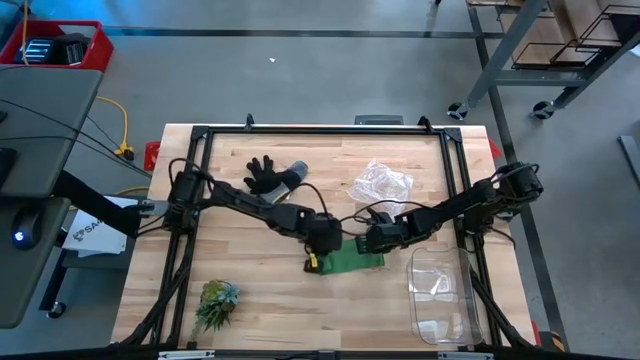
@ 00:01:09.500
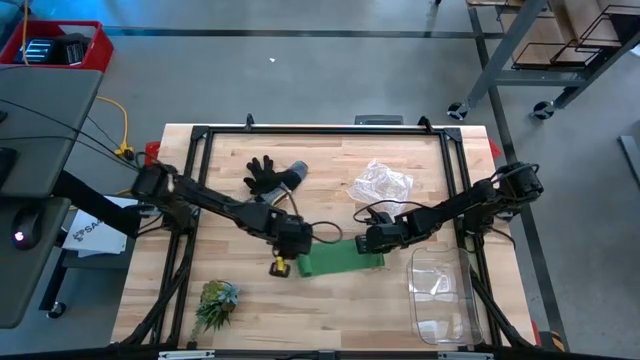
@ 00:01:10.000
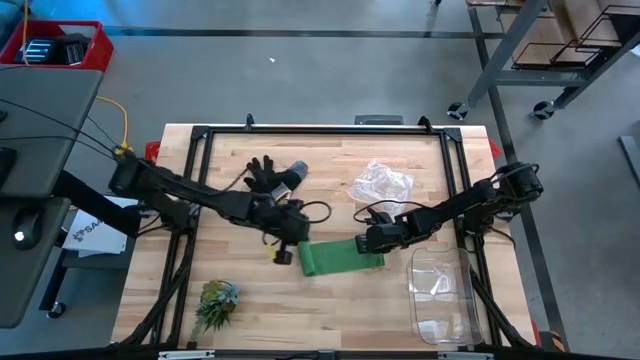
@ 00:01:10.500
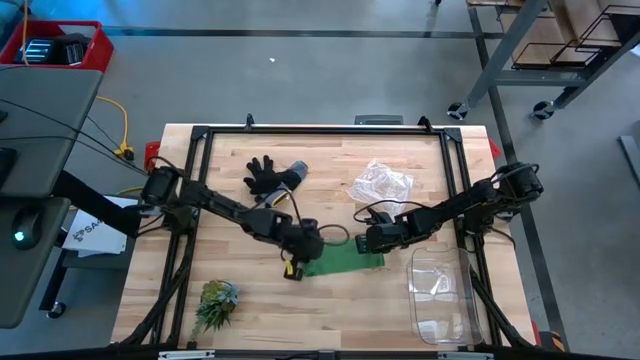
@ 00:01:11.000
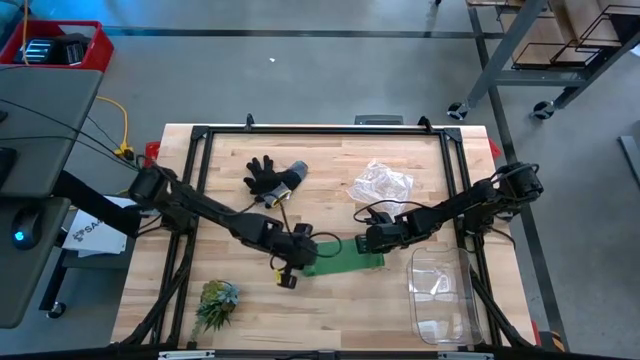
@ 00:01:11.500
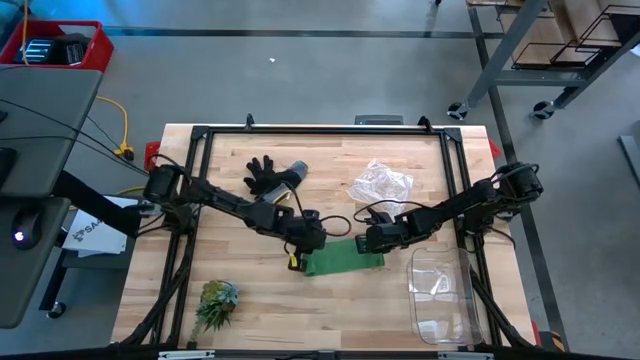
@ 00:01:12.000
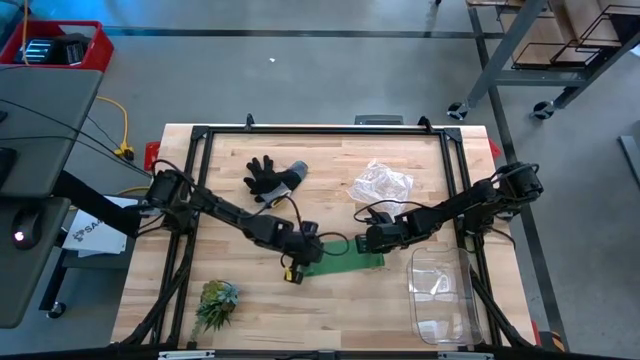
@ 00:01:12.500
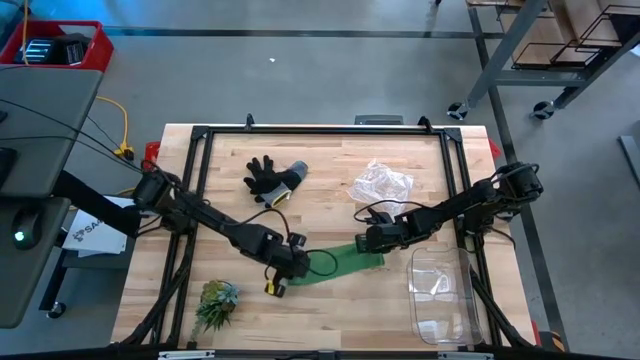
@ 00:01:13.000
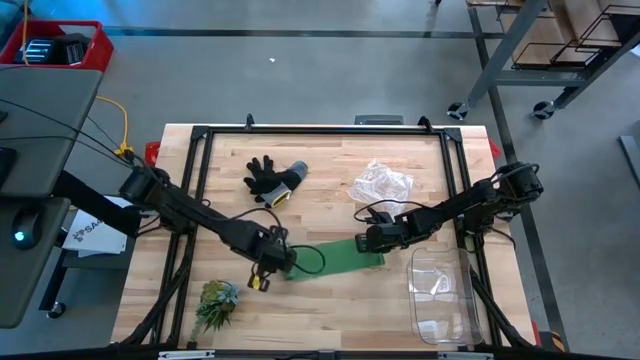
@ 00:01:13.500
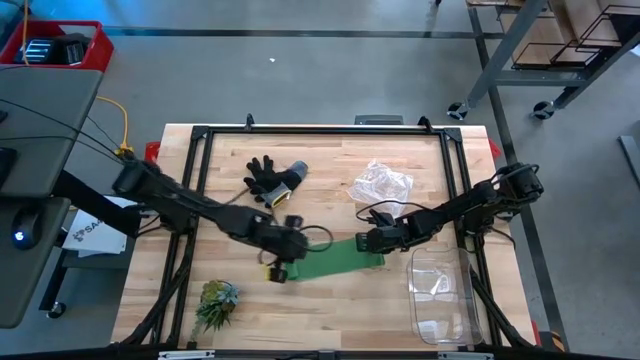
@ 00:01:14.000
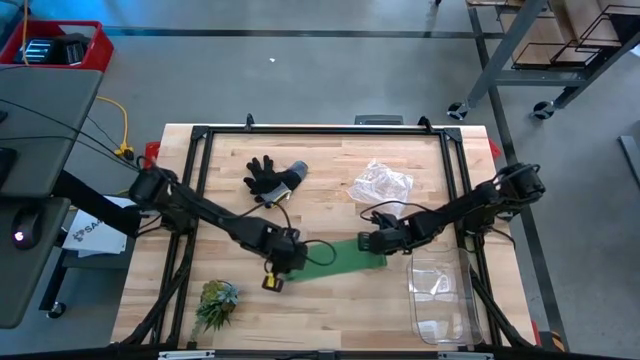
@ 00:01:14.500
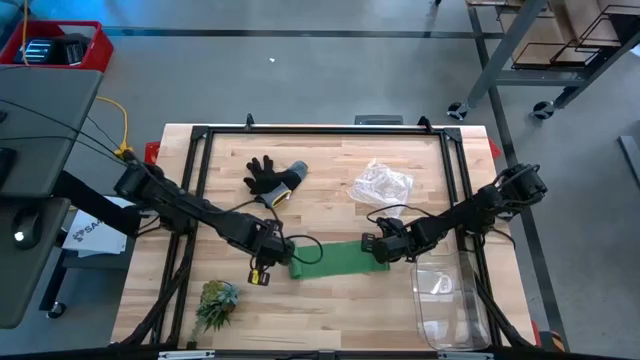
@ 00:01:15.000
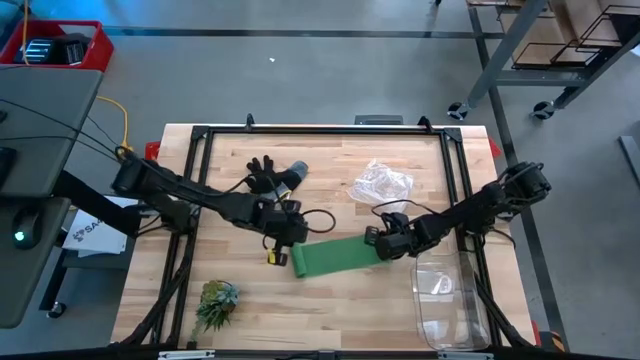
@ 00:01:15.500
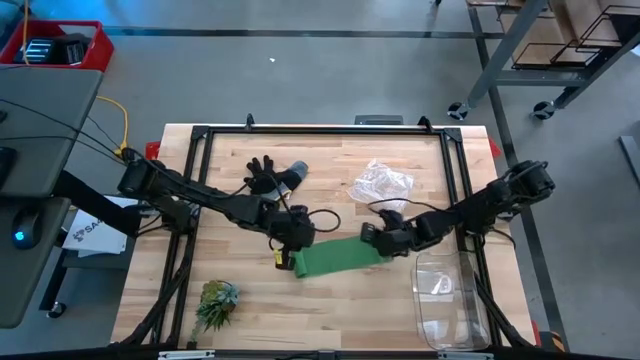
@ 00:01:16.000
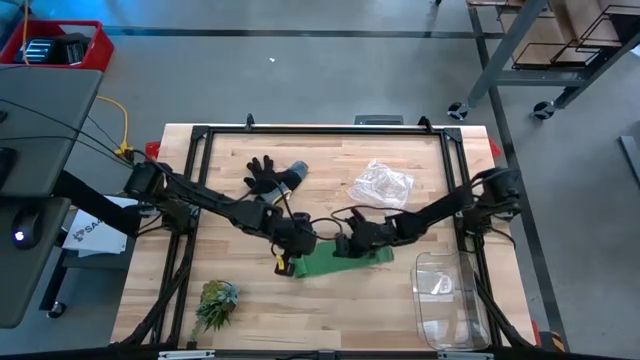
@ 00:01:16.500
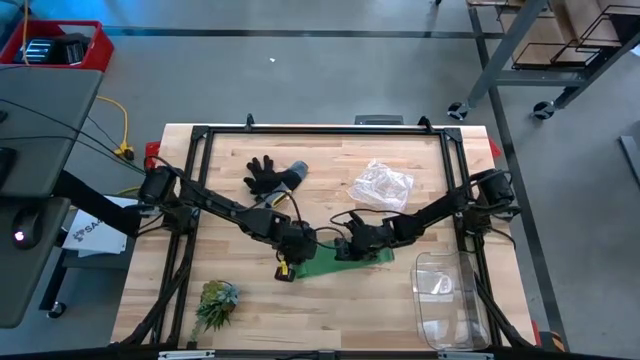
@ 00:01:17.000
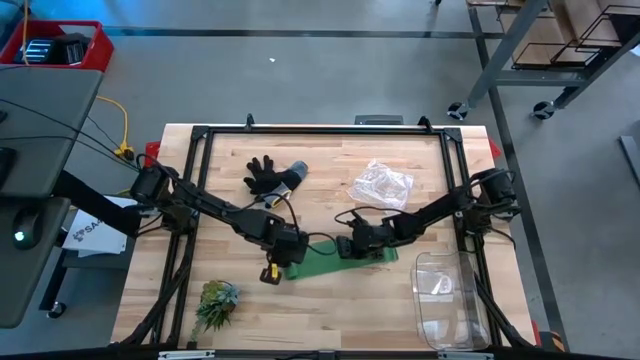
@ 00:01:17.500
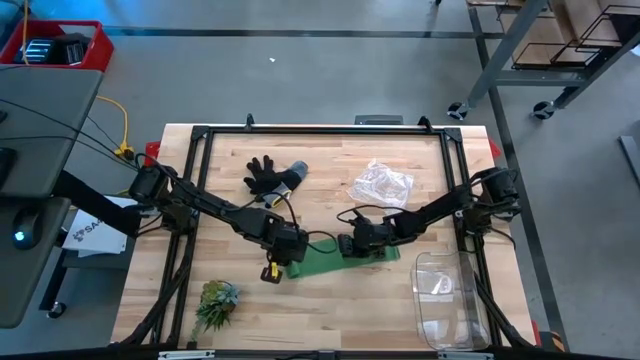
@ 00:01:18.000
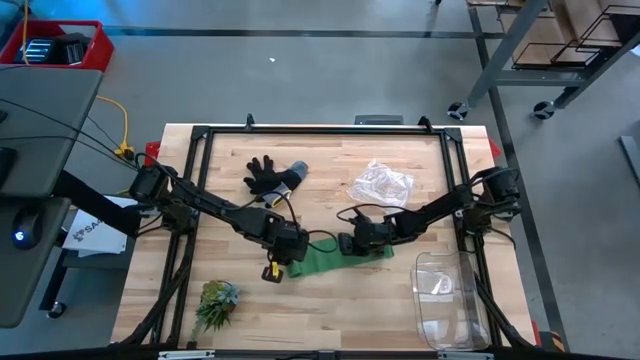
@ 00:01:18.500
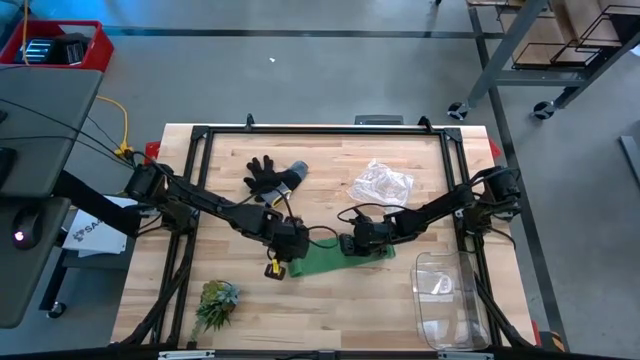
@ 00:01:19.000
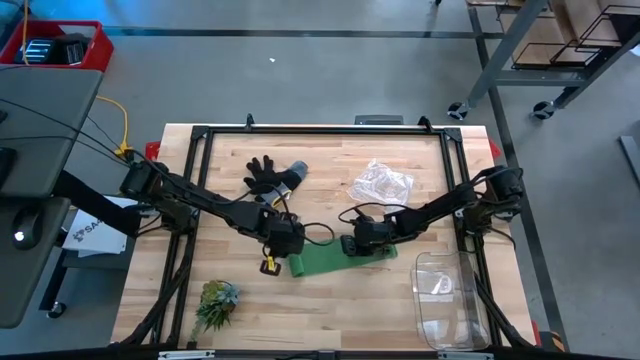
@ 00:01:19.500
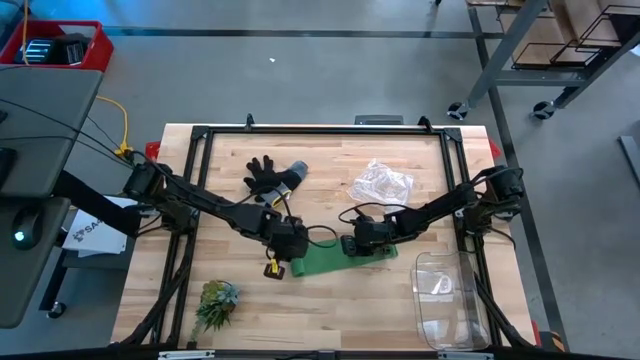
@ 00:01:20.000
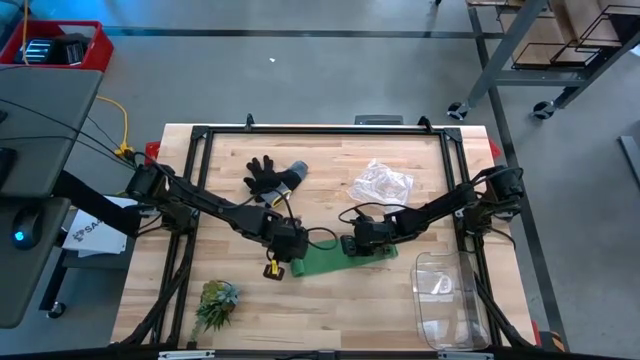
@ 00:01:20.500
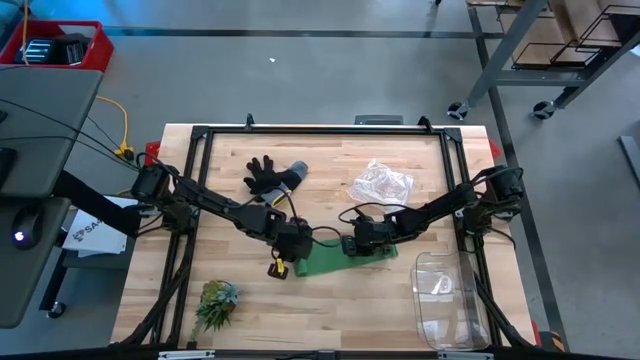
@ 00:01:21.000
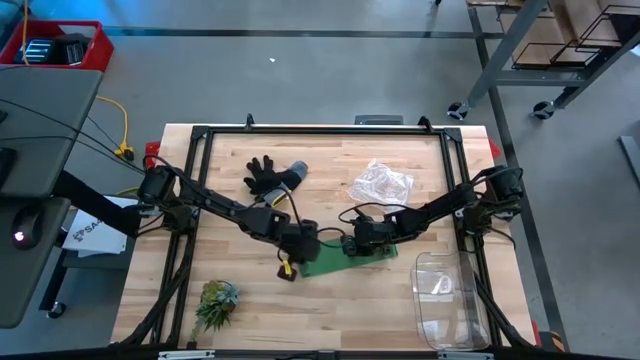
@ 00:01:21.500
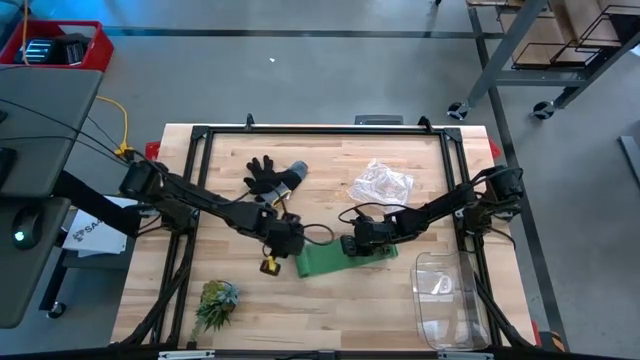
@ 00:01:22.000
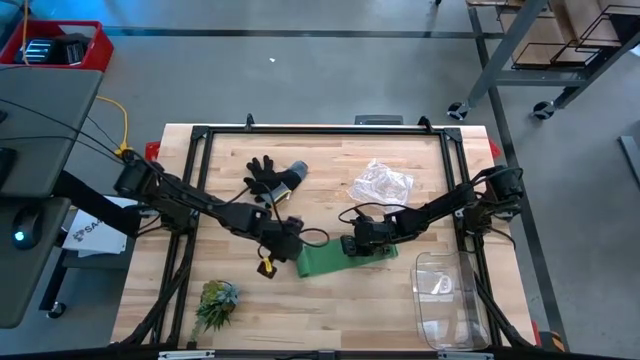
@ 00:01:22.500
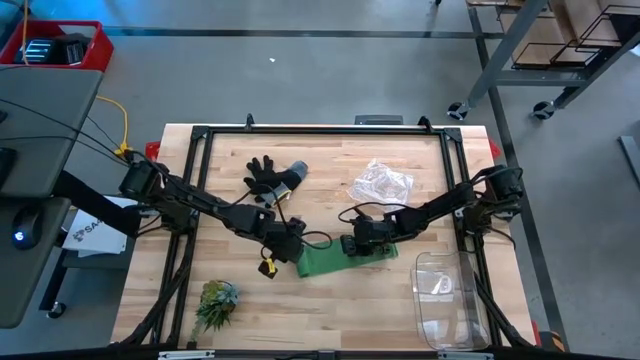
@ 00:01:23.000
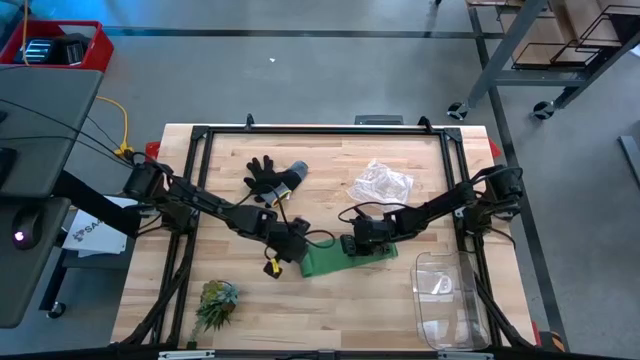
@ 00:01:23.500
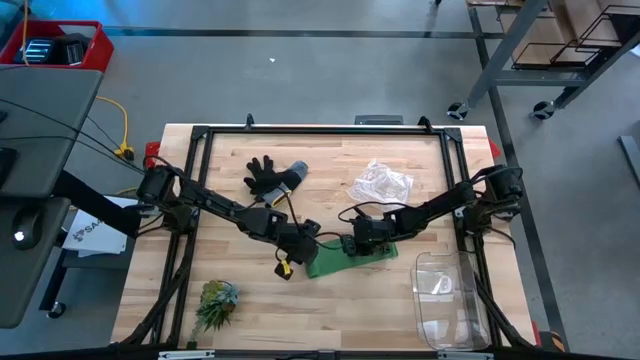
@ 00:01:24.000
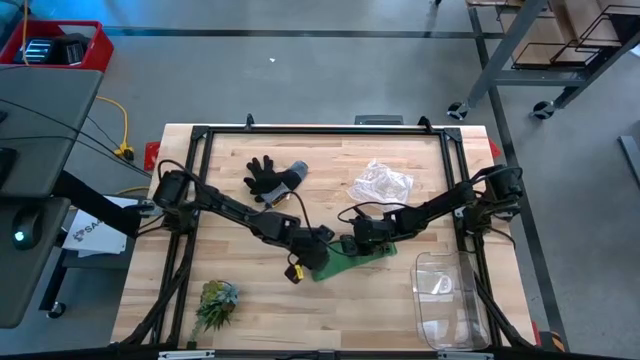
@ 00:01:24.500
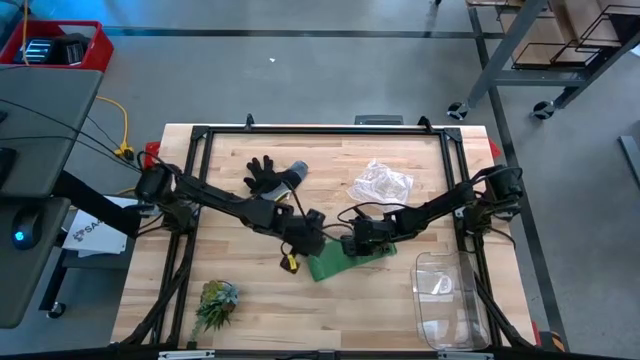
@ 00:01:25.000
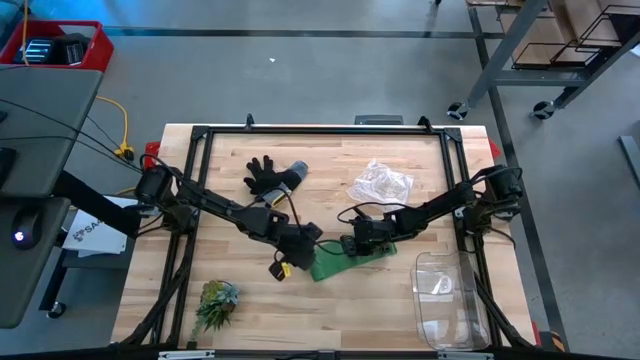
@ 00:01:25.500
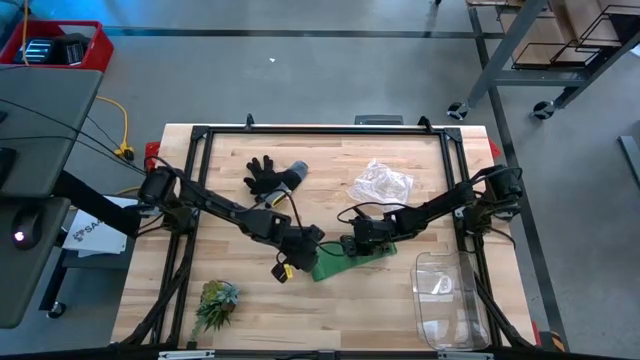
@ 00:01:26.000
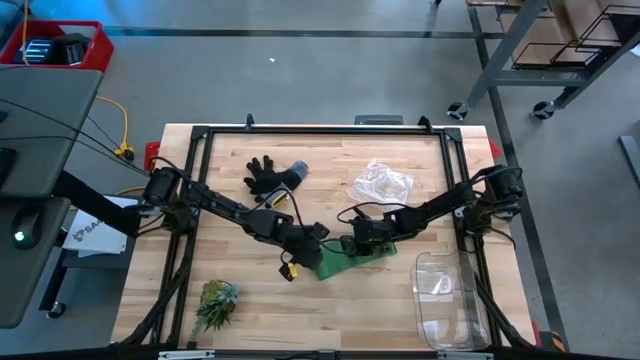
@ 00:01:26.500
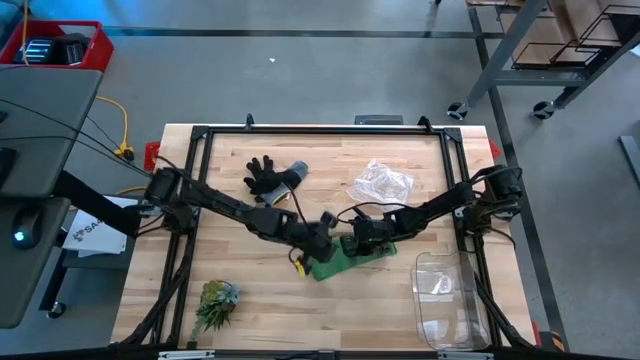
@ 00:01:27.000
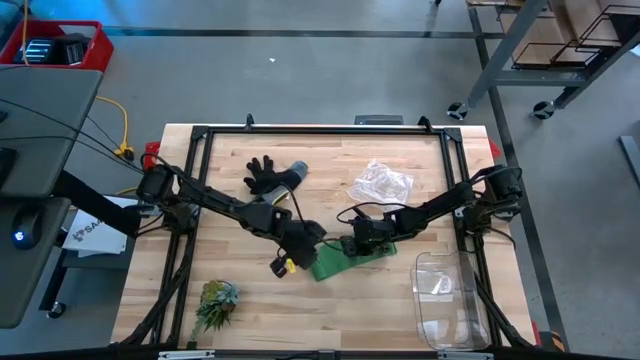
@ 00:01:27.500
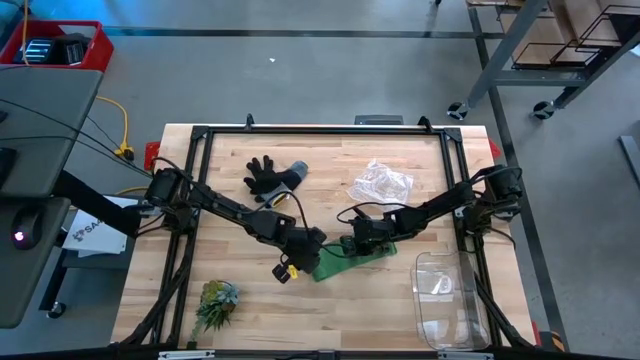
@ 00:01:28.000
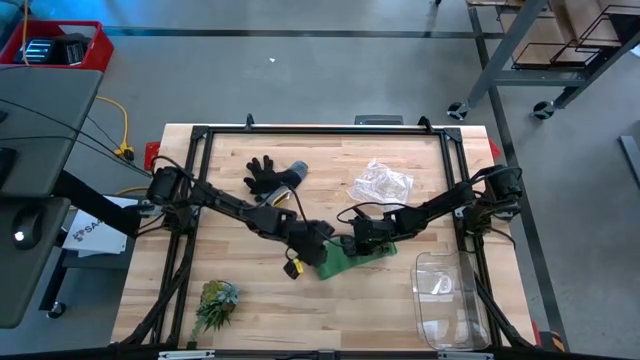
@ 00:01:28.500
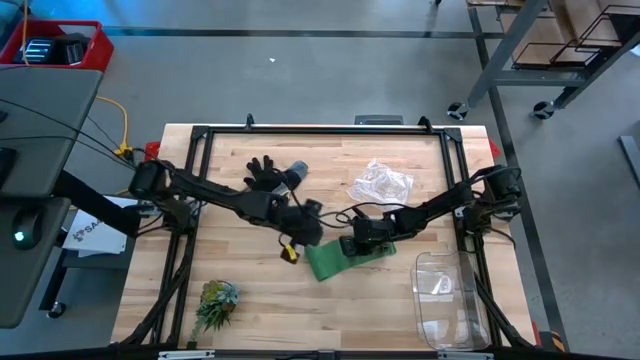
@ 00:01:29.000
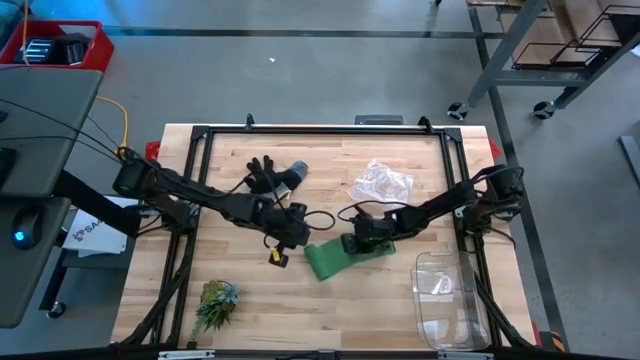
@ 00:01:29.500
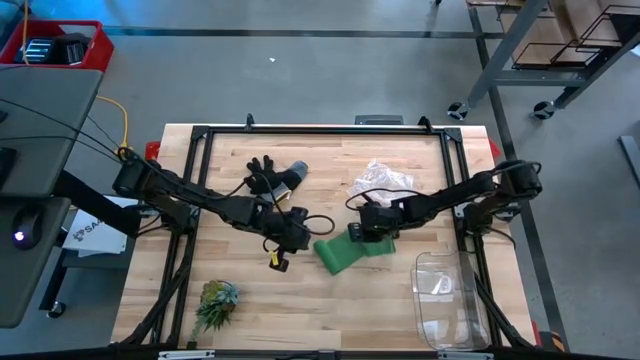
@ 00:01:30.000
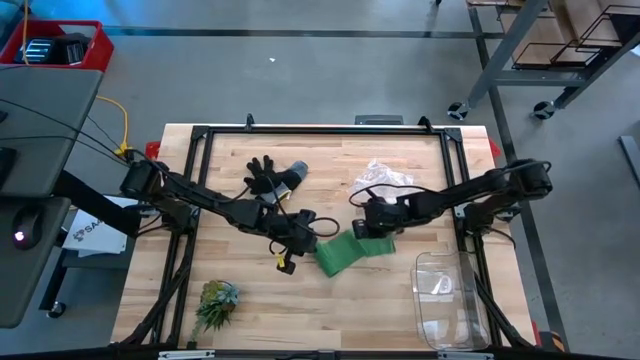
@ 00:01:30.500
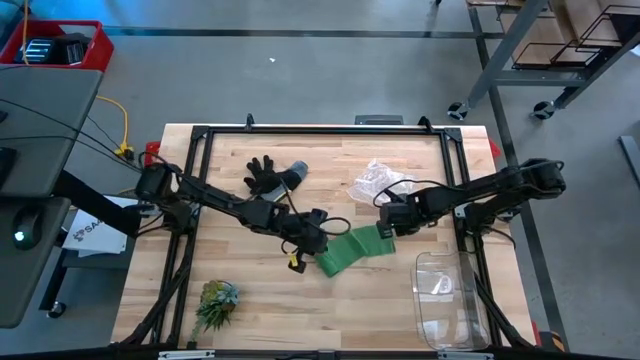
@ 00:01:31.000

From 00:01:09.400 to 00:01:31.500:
Task: Roll bandage
Roll the green bandage
